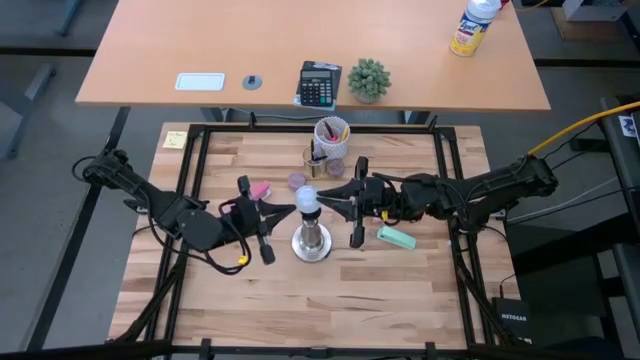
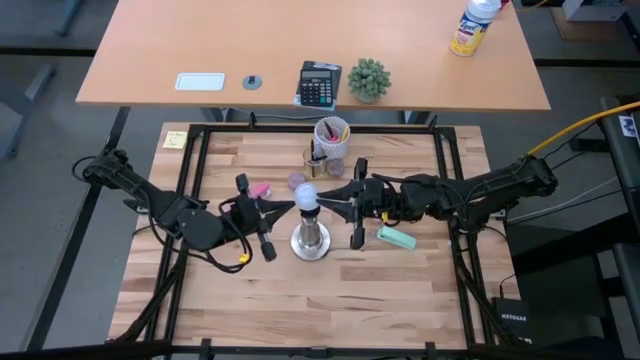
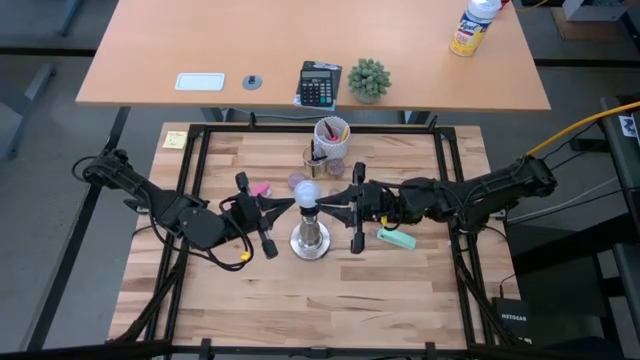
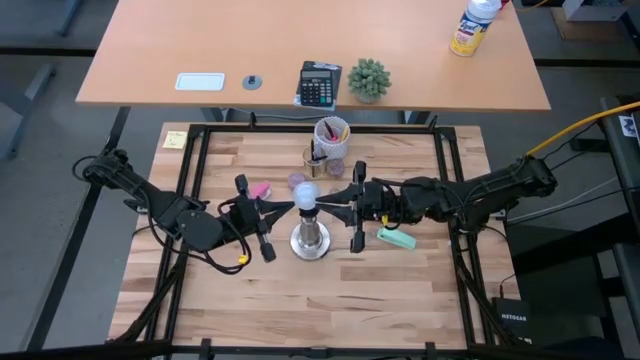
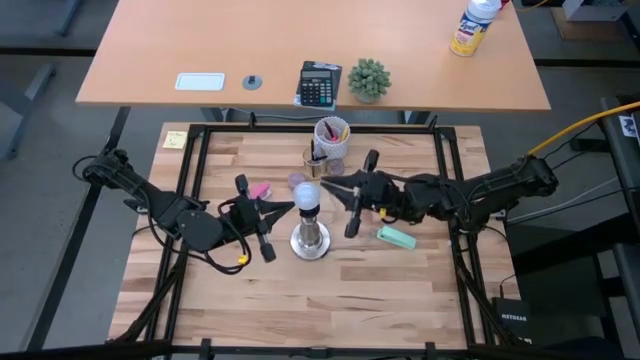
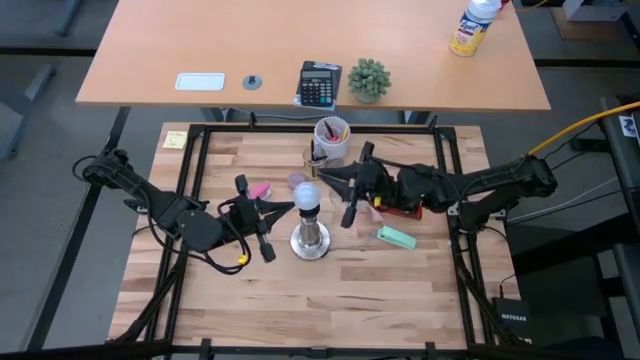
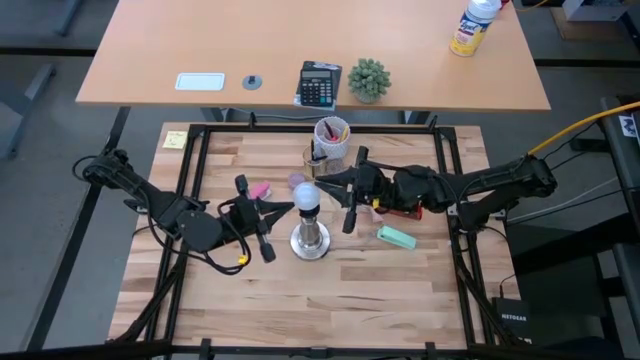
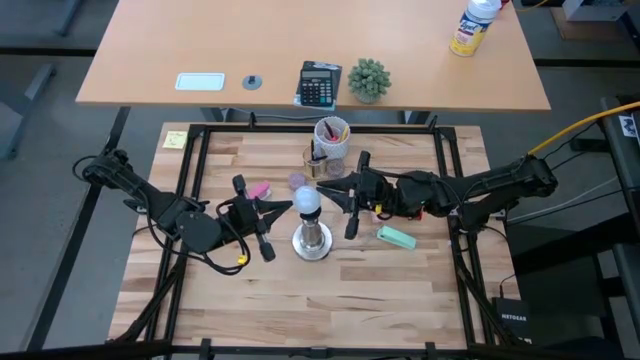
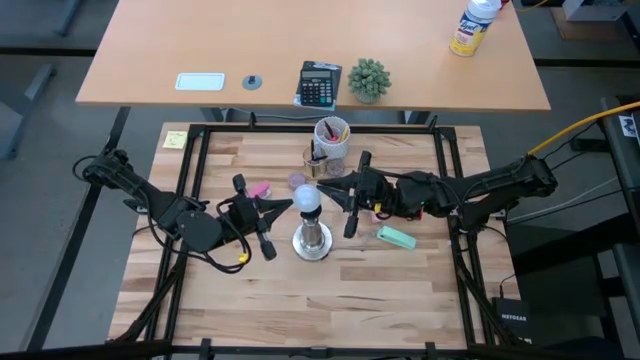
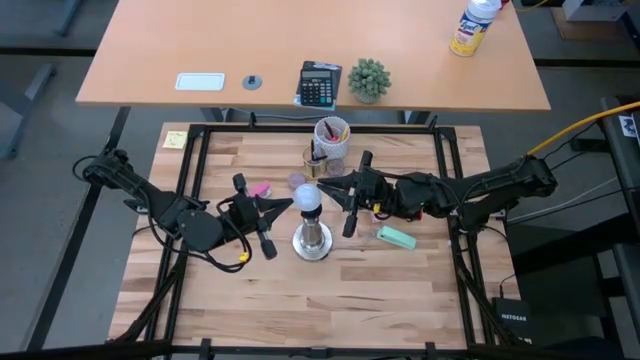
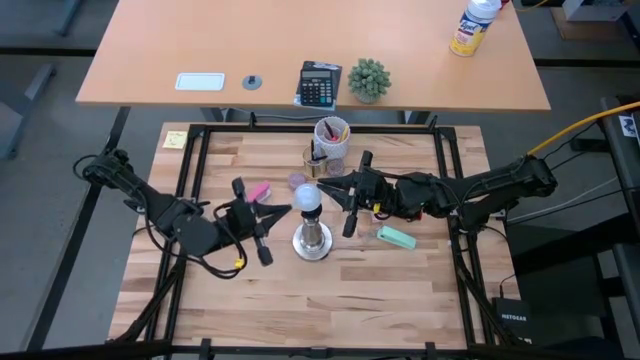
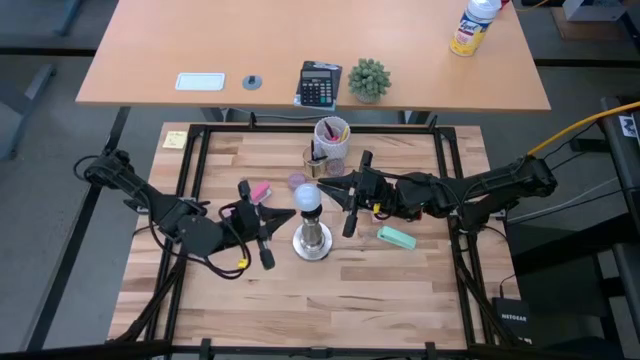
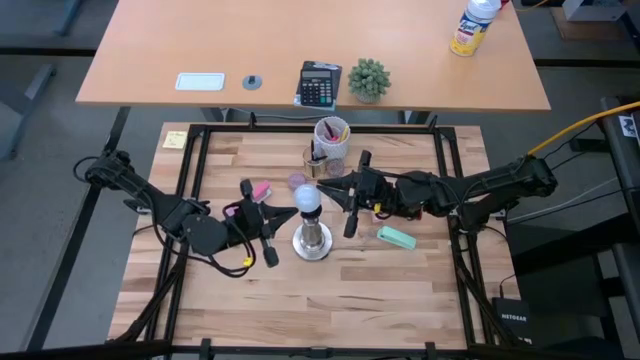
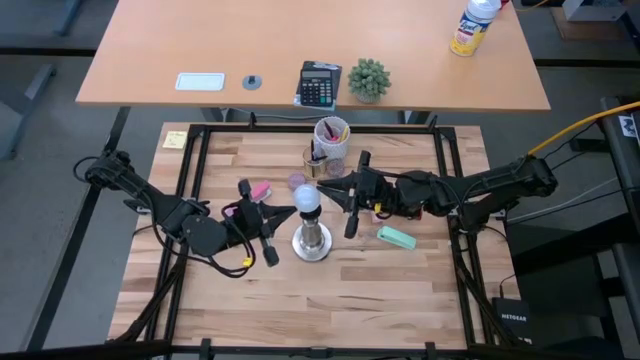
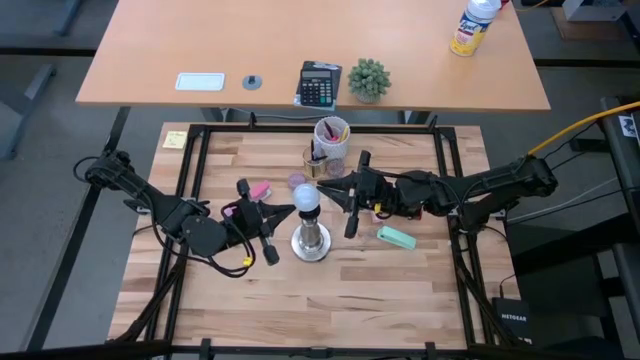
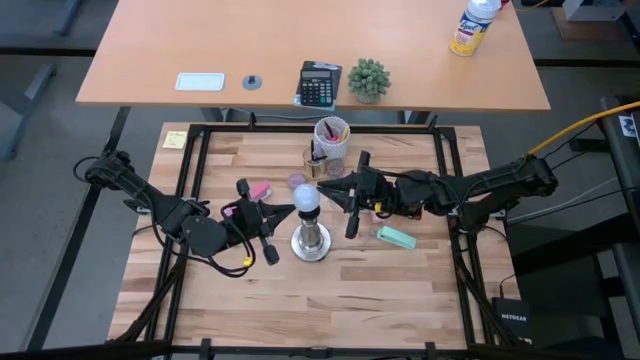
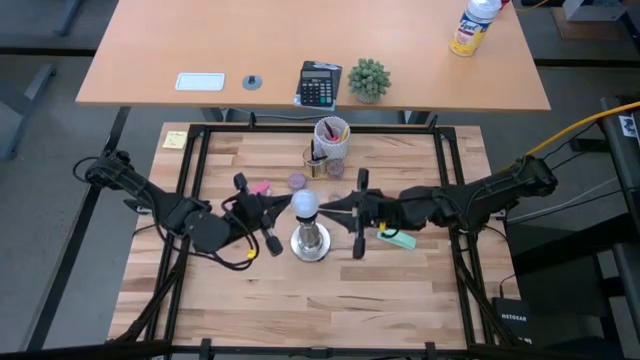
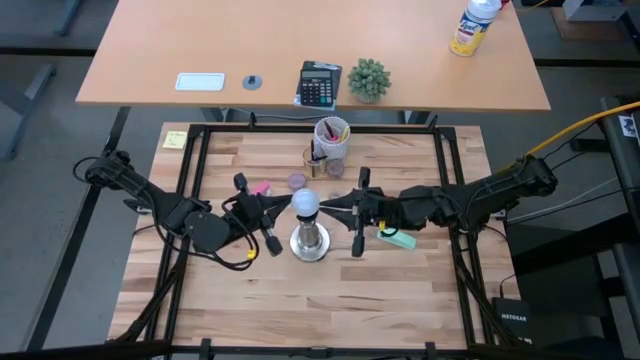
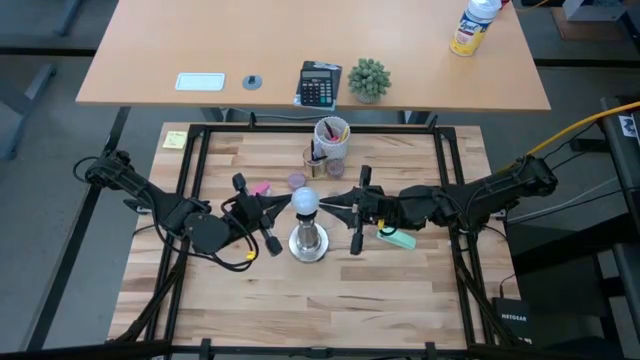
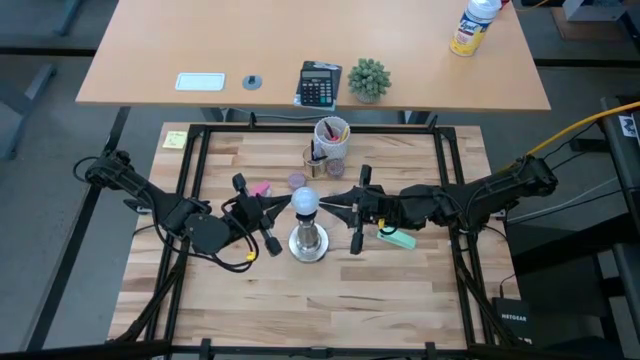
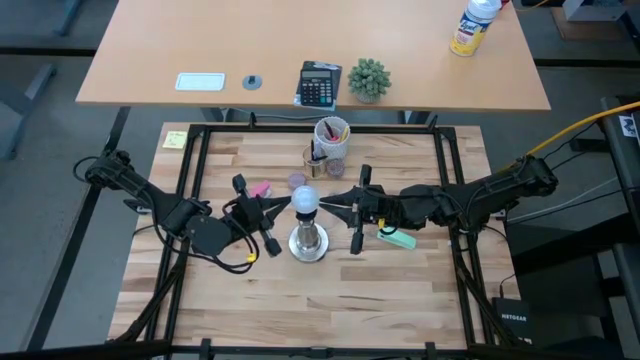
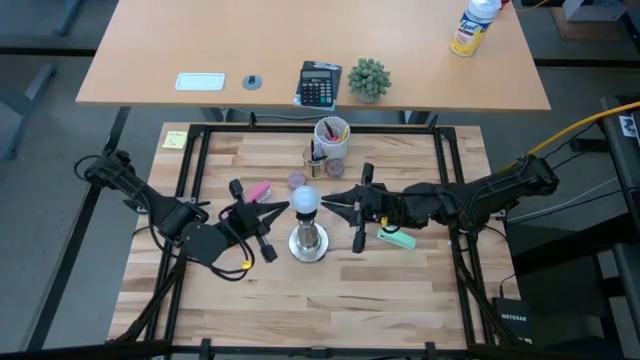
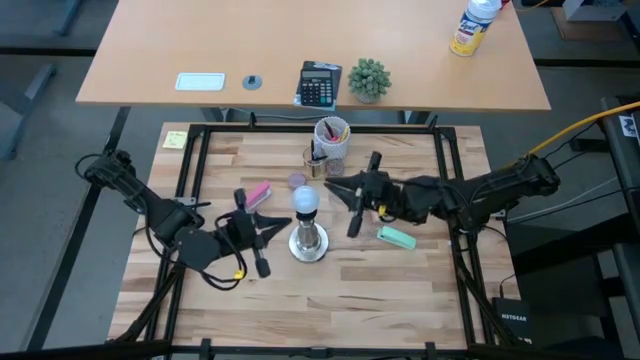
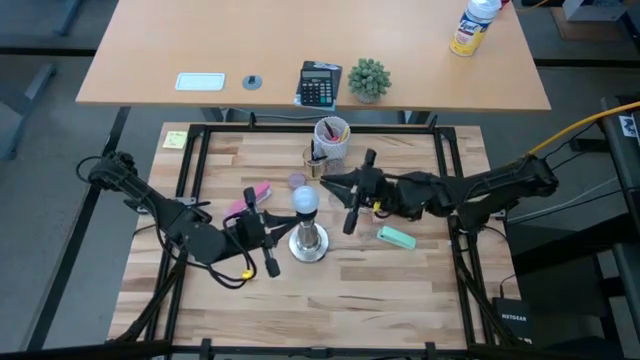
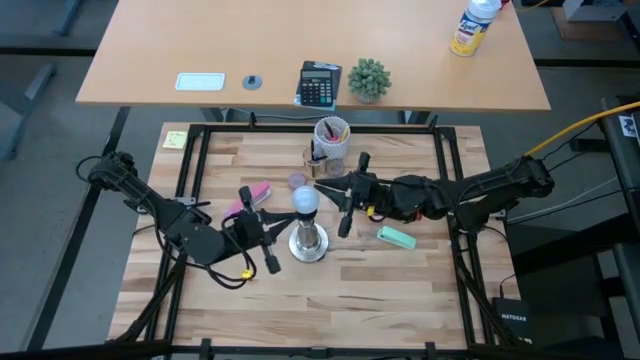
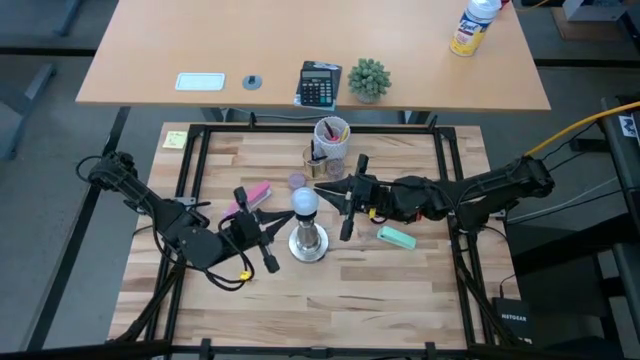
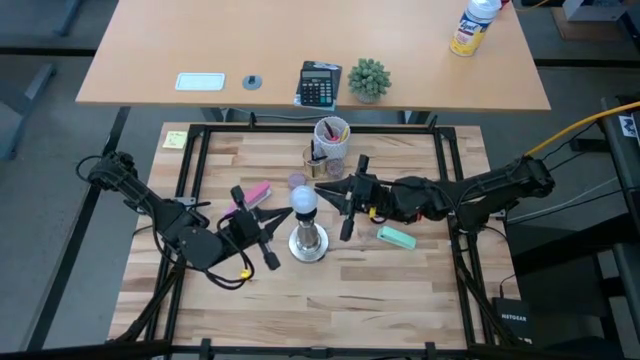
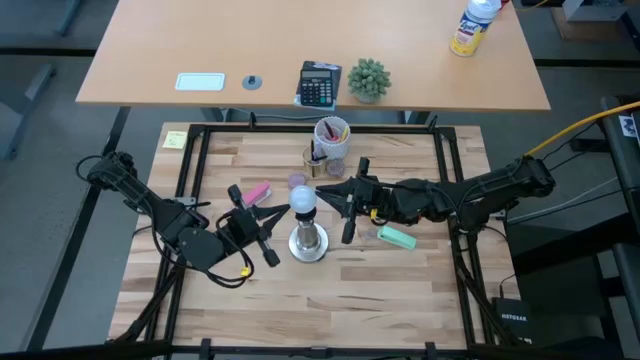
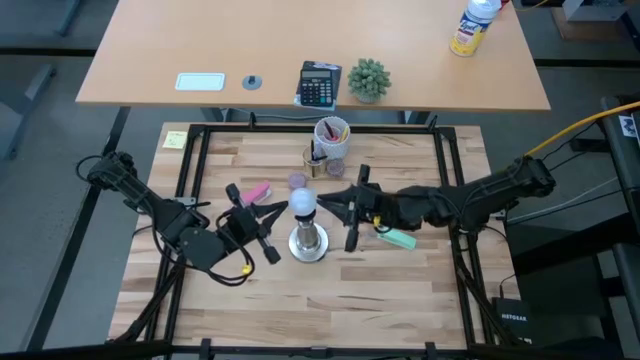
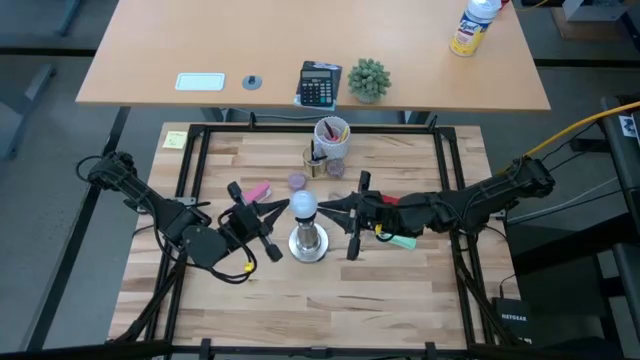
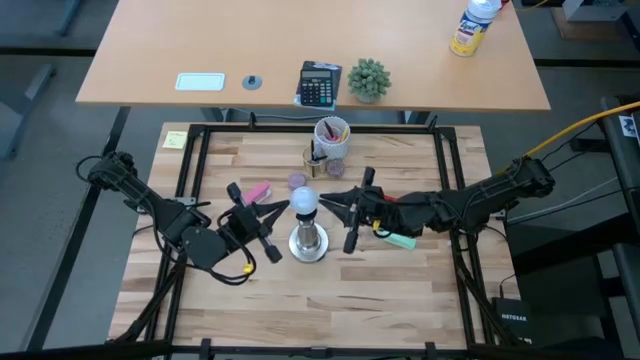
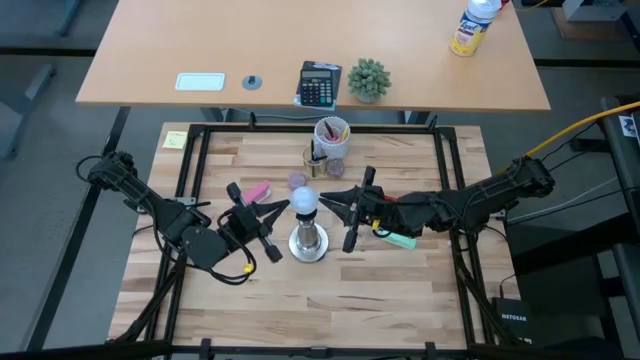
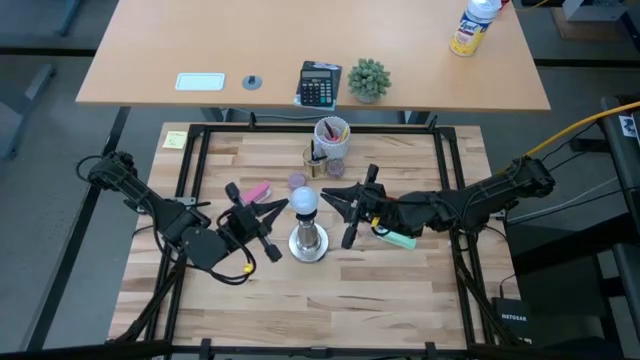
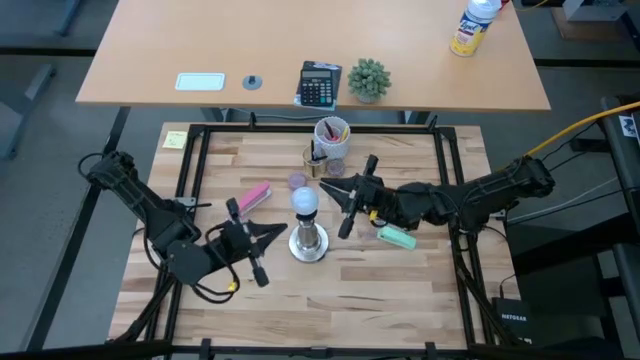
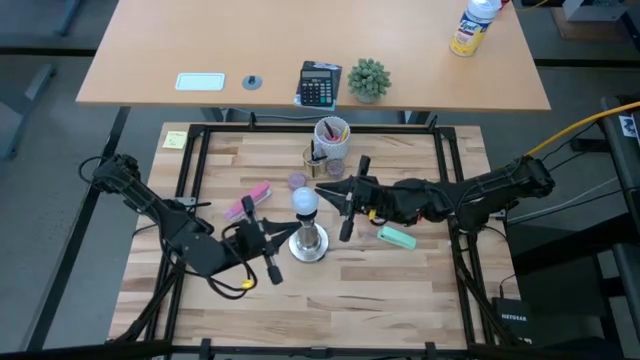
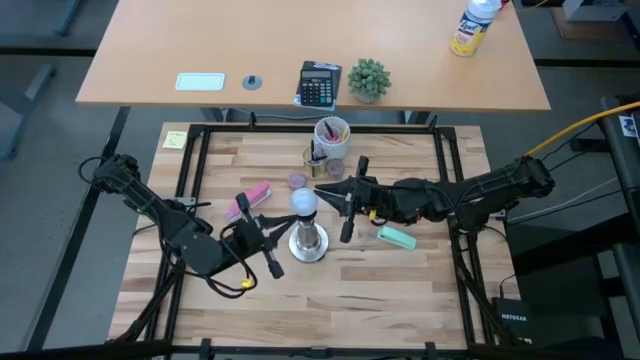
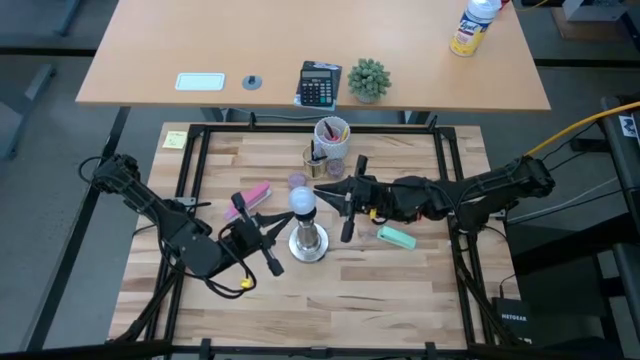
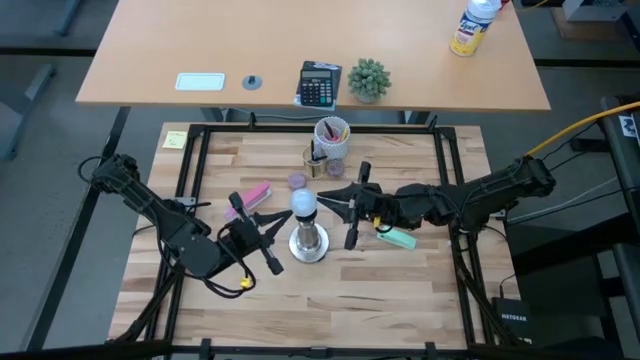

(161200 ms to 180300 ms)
Task: Screw lightbulb
Insert the lightbulb into the lamp socket

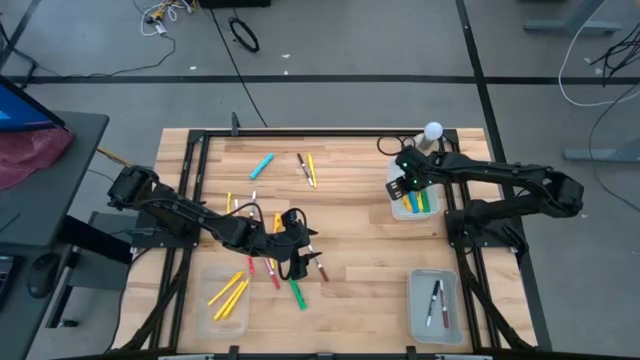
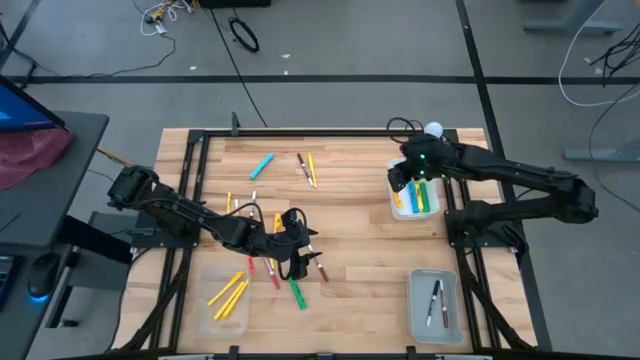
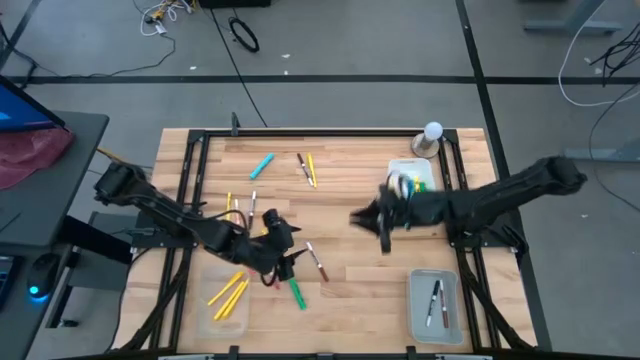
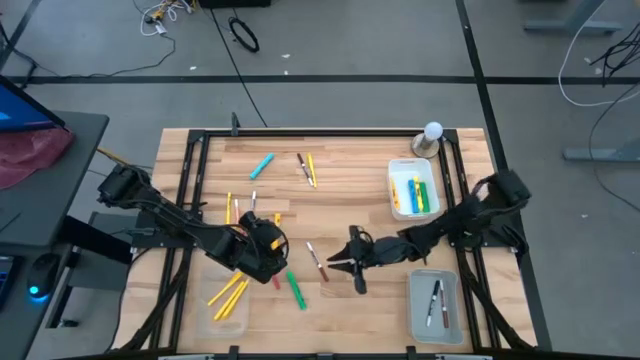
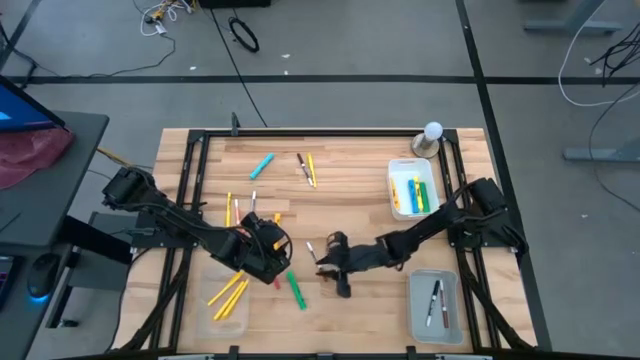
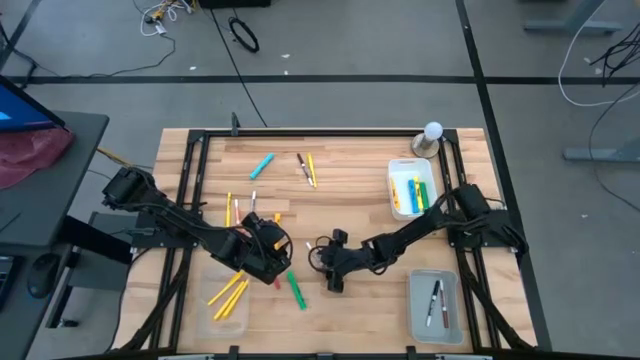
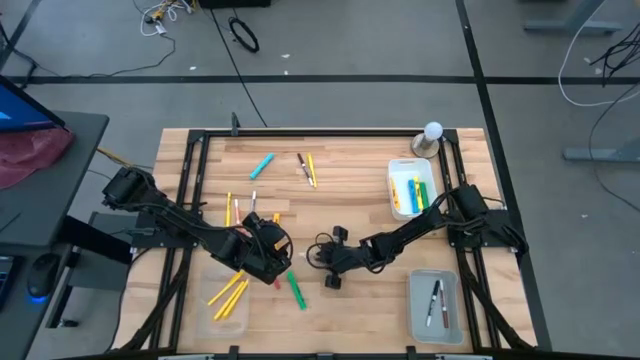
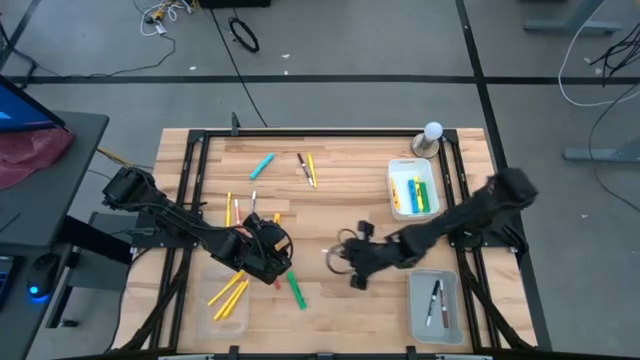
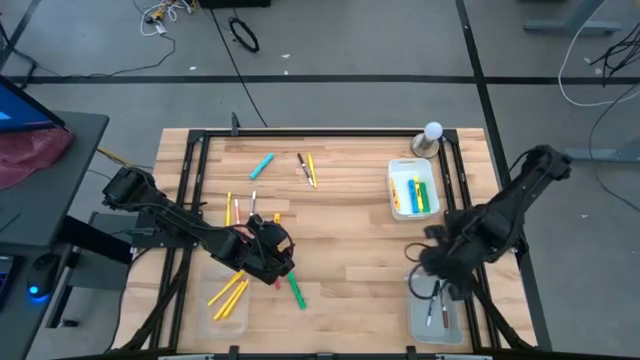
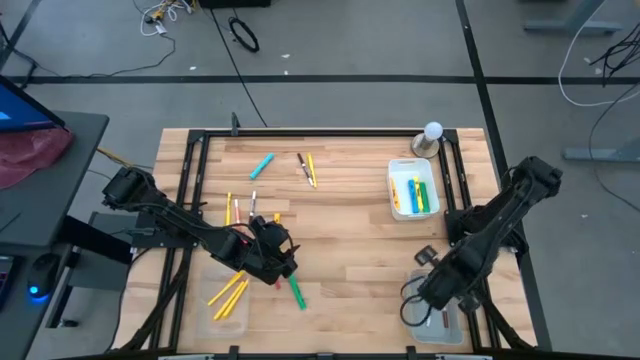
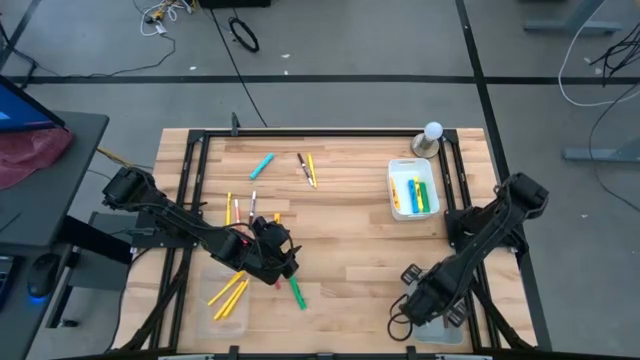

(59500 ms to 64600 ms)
Task: Pick & Place Markers
Put the brown marker into the gray bin
